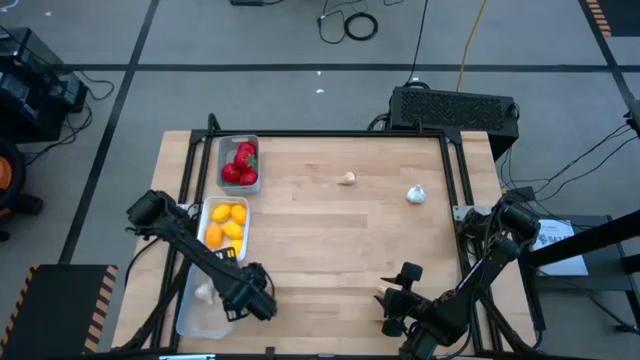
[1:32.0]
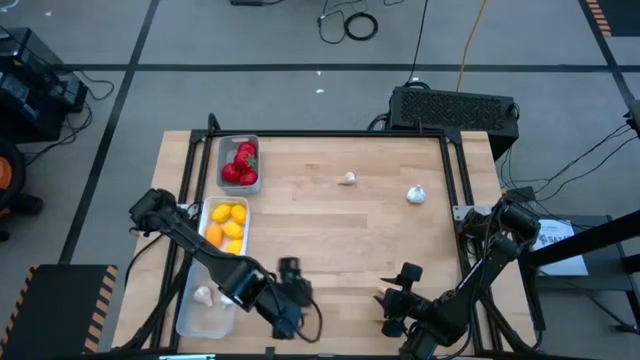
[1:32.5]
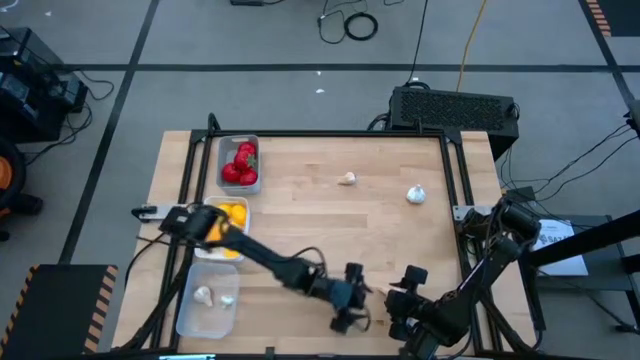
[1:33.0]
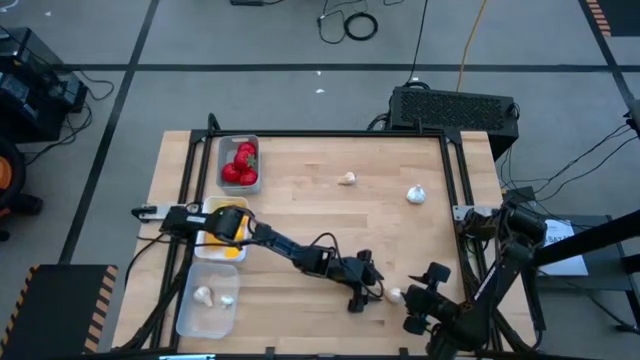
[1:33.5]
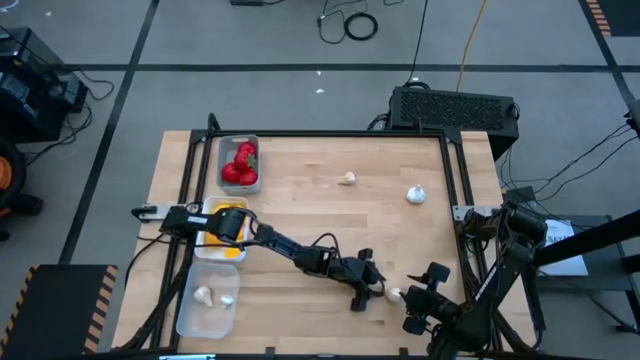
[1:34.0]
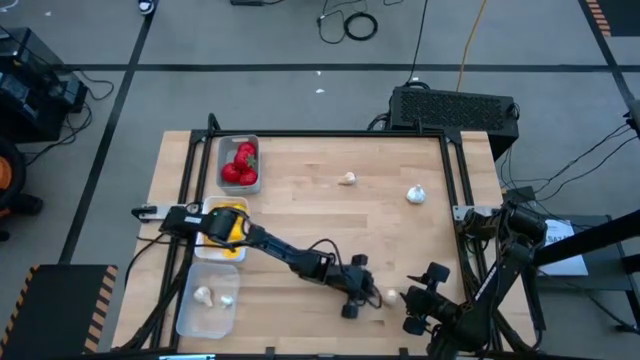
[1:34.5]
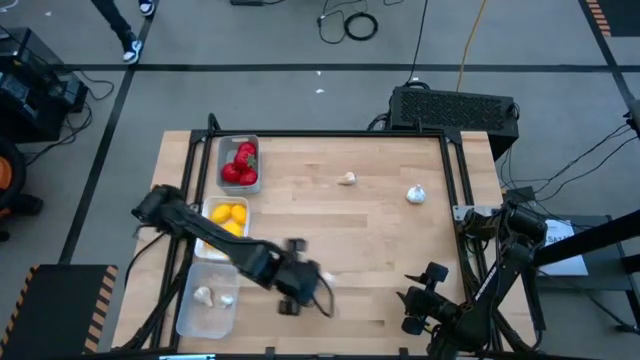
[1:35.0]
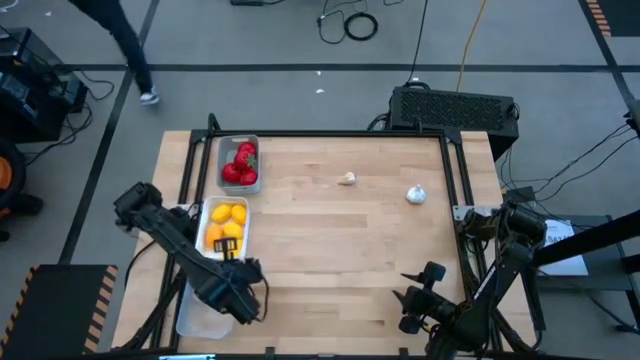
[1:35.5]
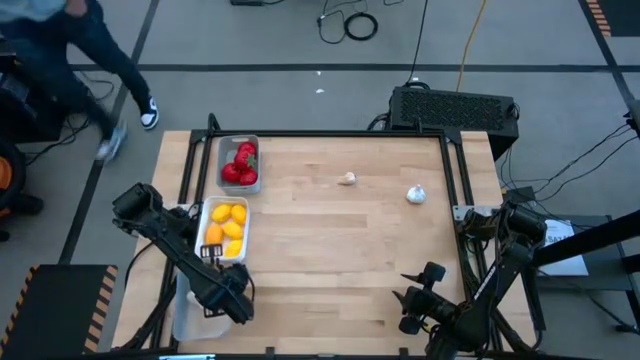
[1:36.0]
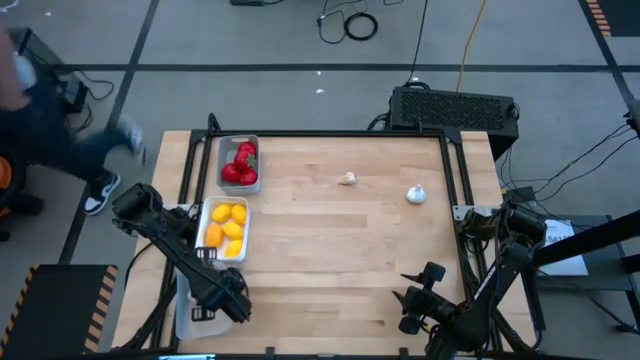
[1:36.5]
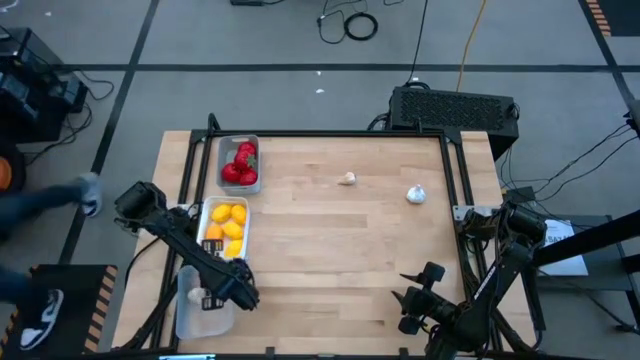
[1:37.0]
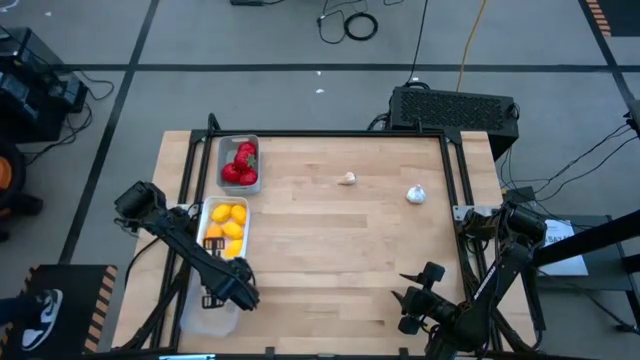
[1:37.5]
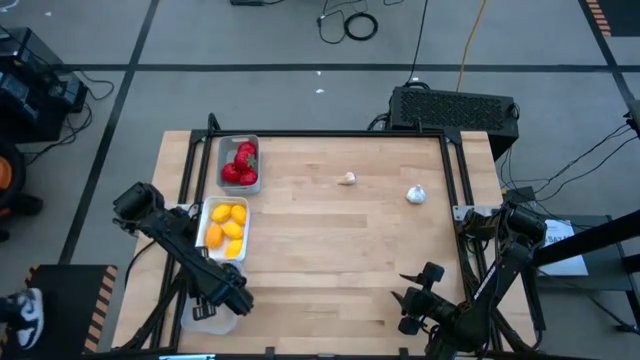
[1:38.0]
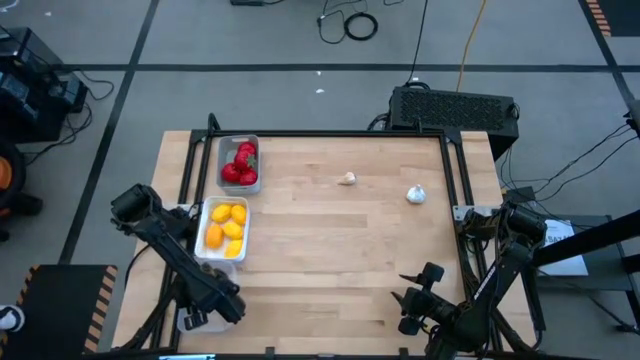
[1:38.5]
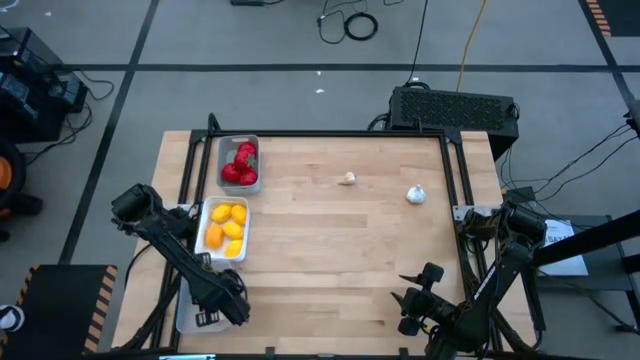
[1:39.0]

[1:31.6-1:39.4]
Task: Sort produce into baskets
Put the garlic into the transparent bin

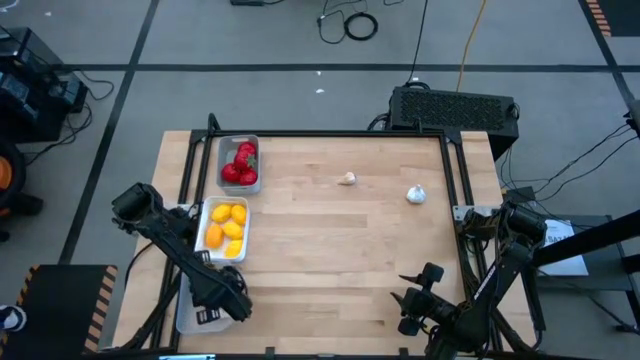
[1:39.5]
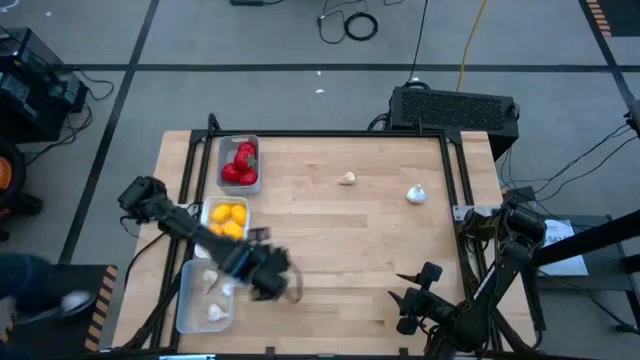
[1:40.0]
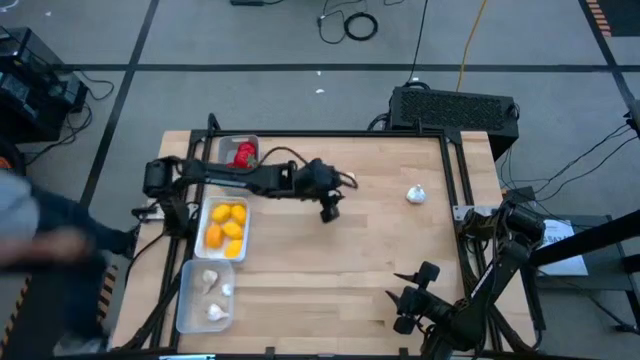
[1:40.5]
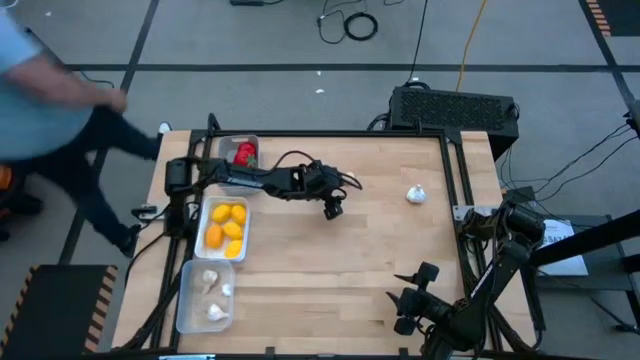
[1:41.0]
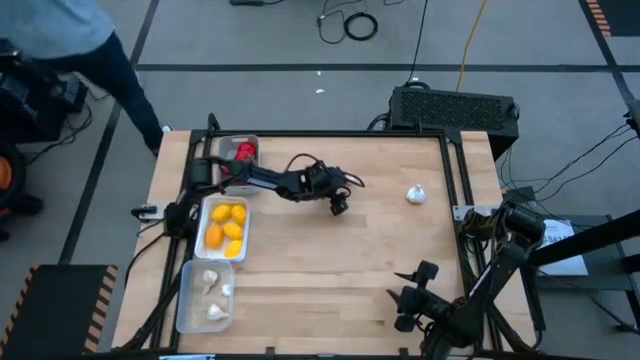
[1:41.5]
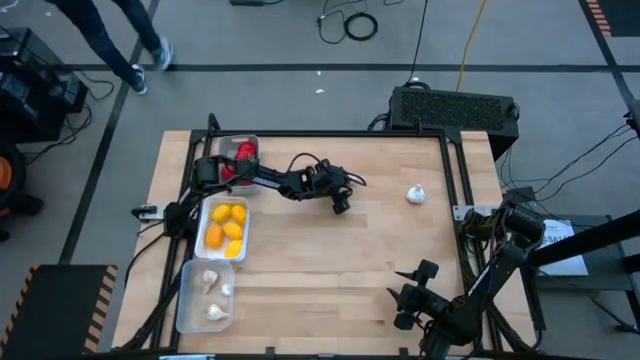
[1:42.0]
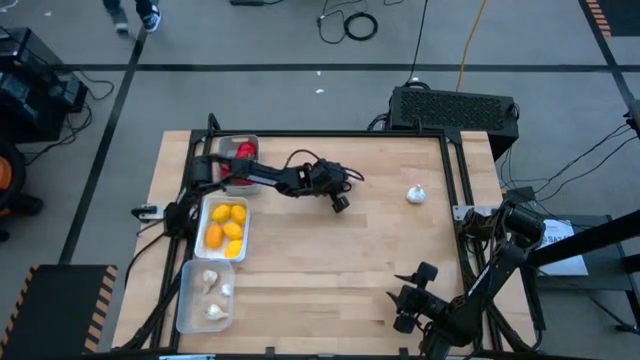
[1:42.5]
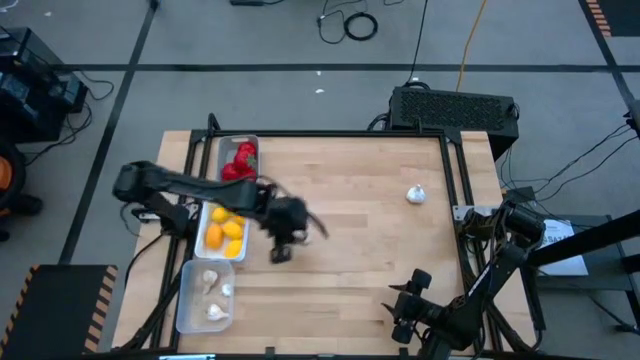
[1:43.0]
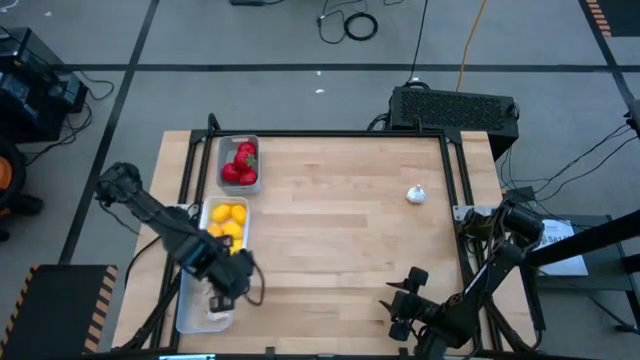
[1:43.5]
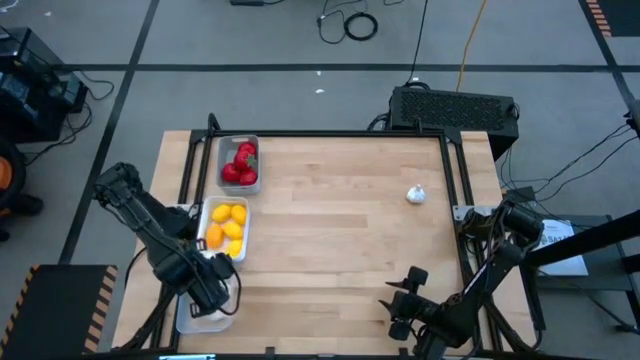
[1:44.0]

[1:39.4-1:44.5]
Put the garlic into the transparent bin

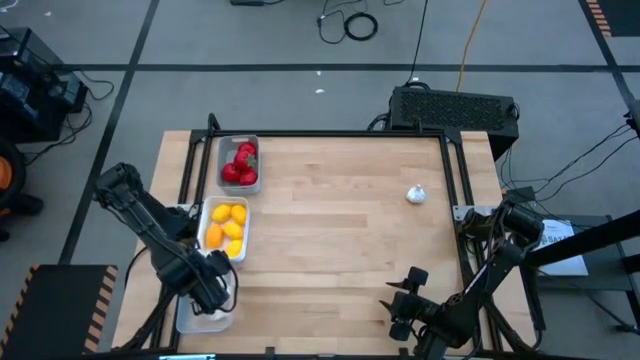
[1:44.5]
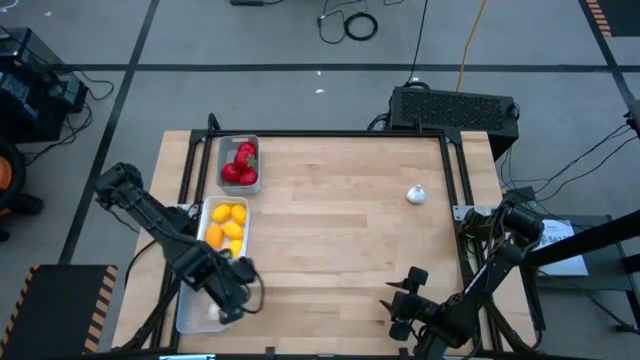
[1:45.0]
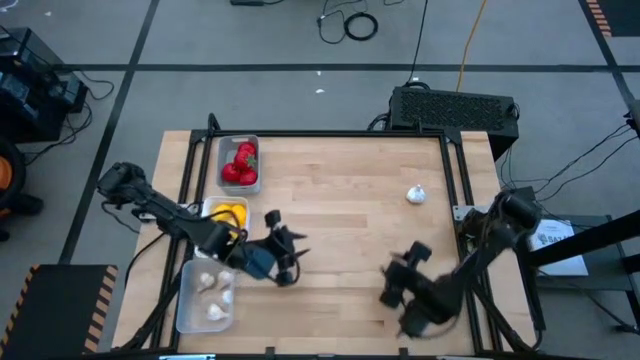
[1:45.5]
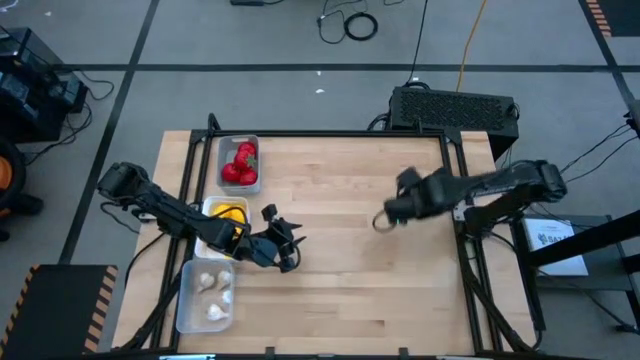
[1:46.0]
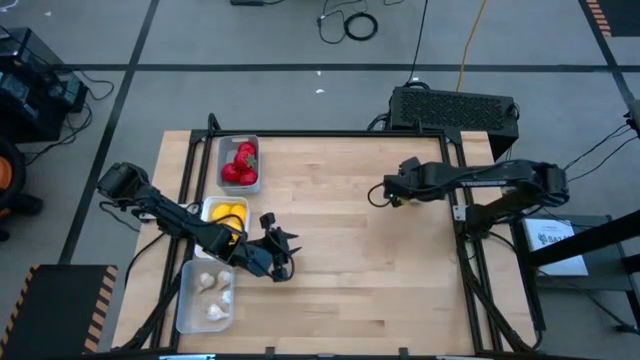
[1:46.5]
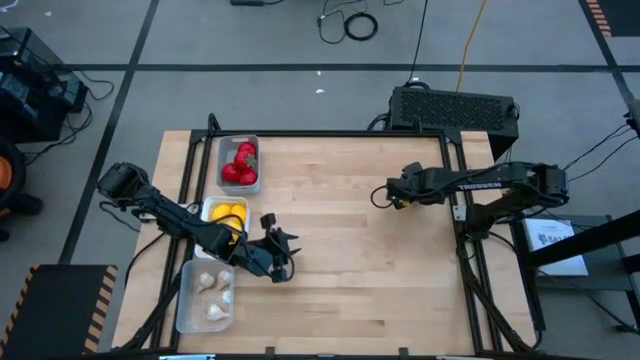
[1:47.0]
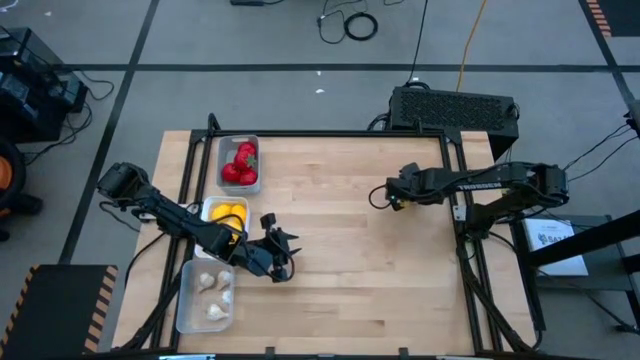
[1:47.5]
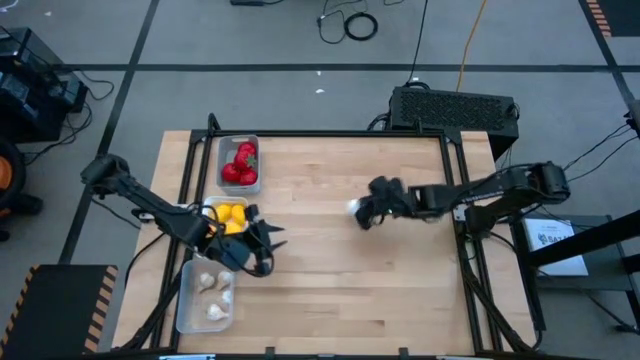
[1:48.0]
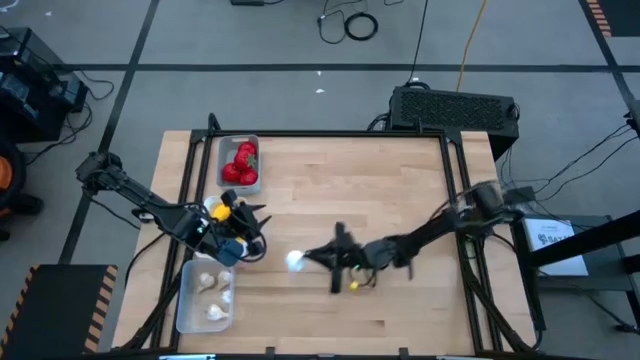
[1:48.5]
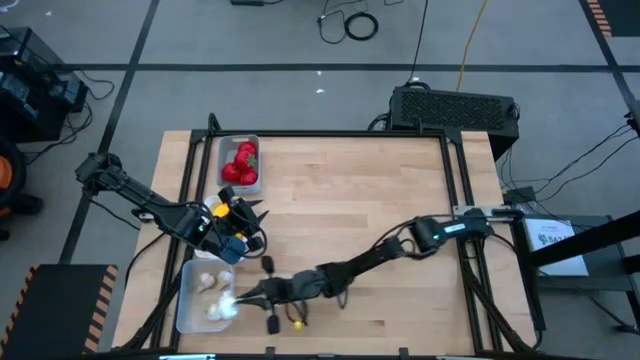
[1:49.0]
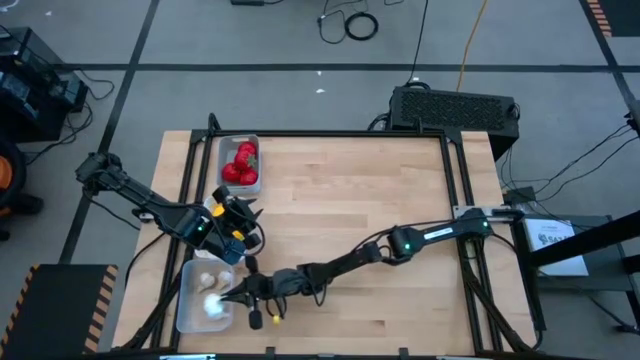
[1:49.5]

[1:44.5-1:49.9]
Put the garlic into the transparent bin

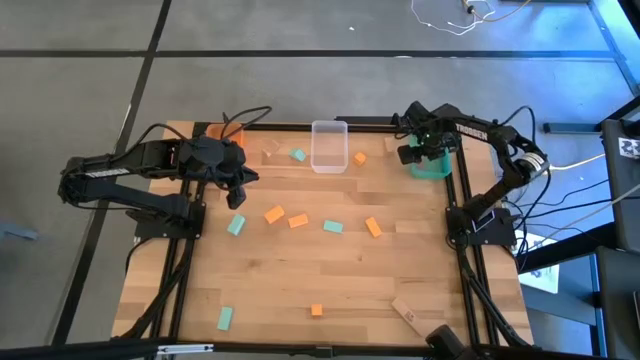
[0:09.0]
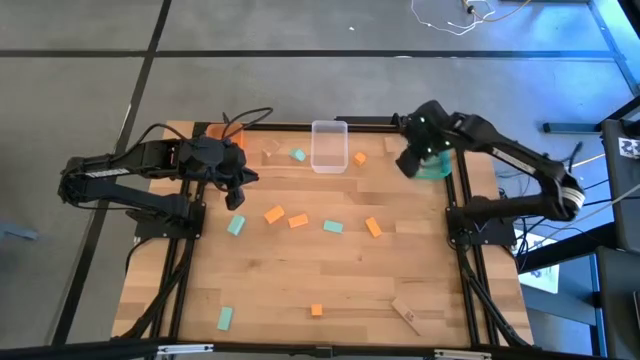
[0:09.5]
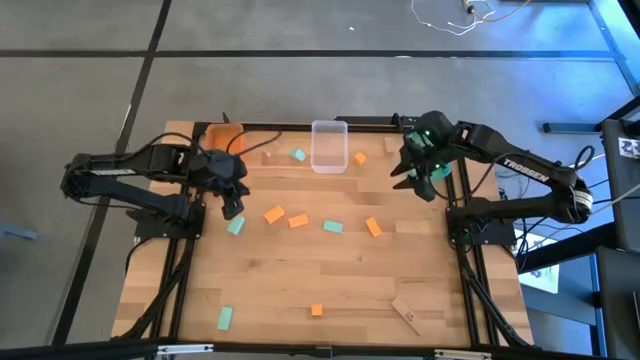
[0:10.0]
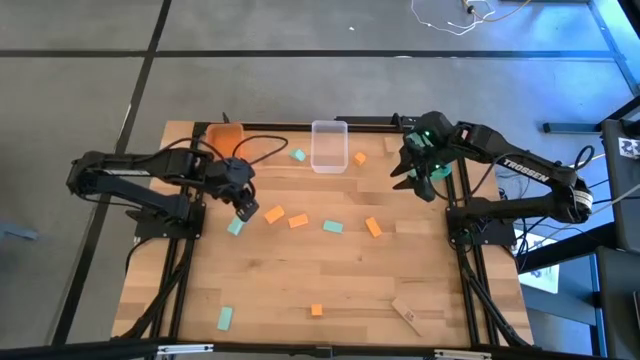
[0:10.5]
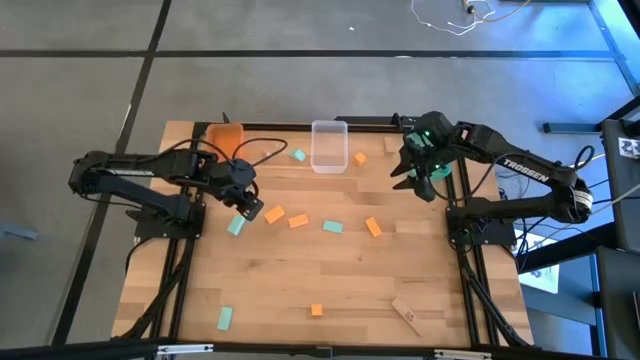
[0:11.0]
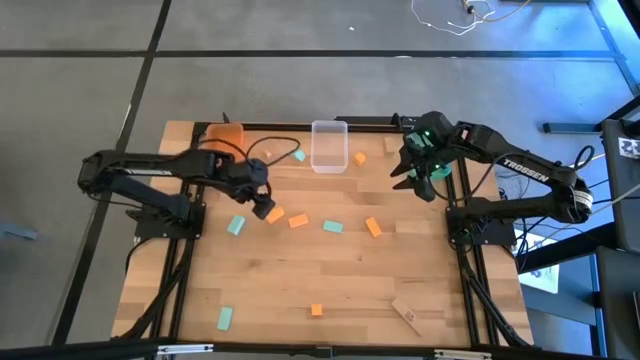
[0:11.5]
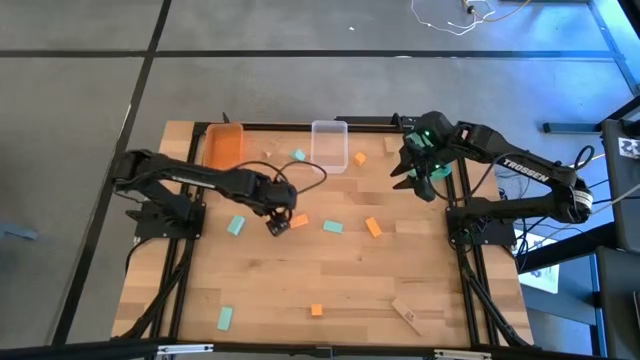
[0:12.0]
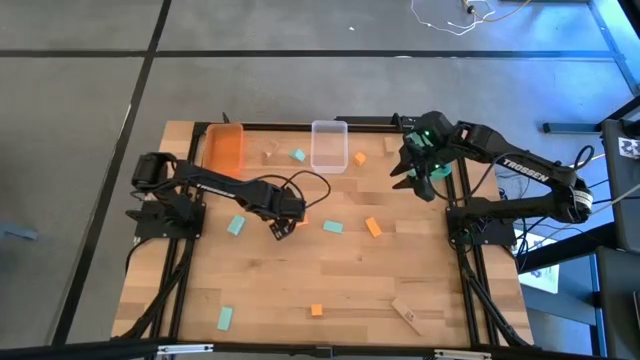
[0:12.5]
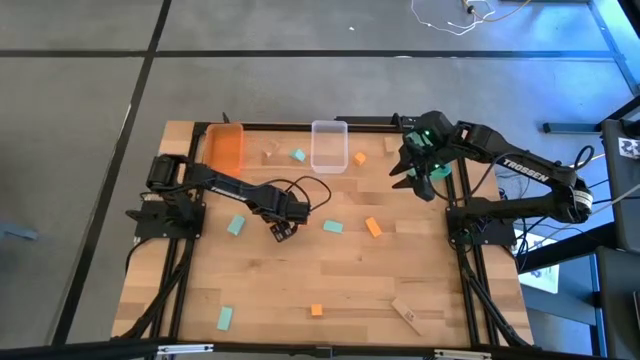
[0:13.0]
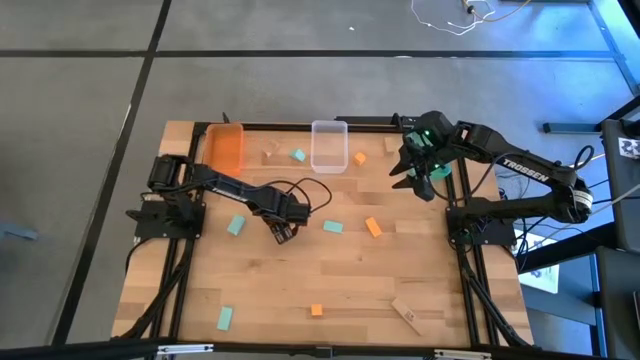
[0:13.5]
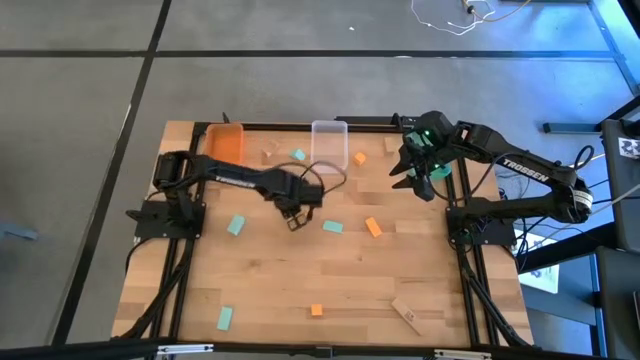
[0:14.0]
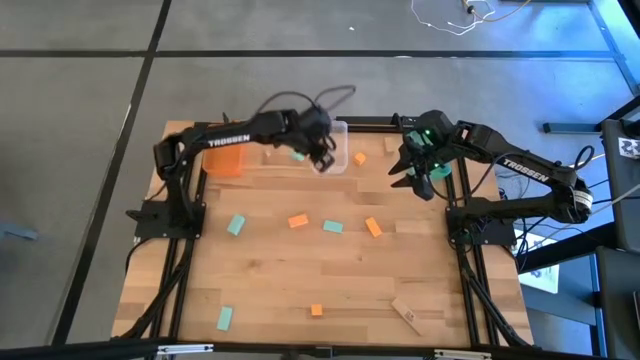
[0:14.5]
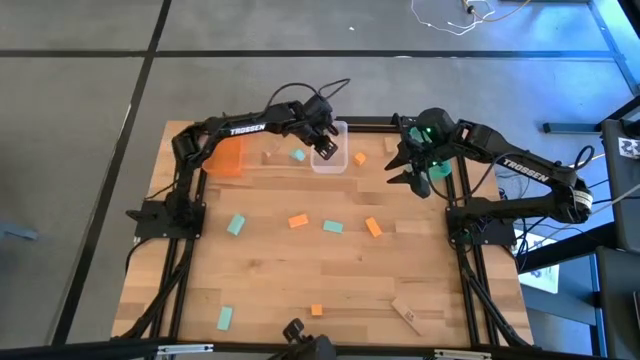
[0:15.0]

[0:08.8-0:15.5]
Task: Sort & place blocks by color
Put the orange block into the transparent bin
